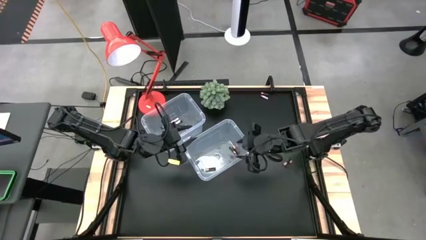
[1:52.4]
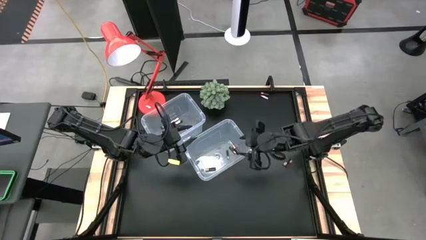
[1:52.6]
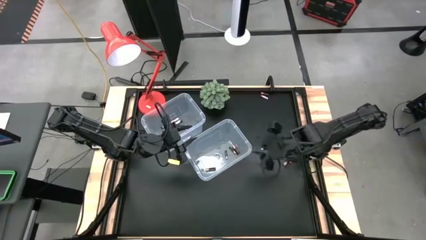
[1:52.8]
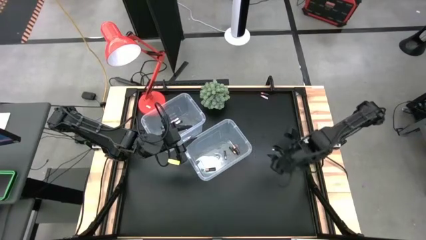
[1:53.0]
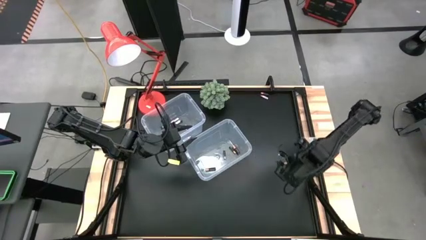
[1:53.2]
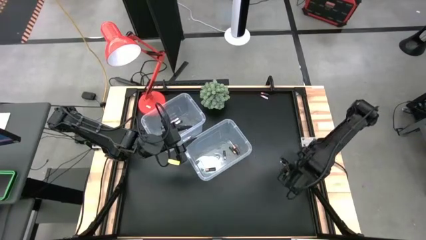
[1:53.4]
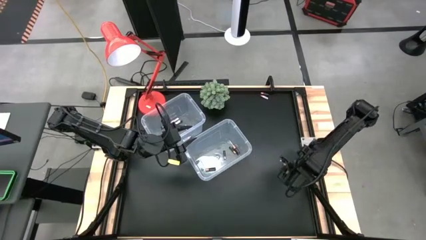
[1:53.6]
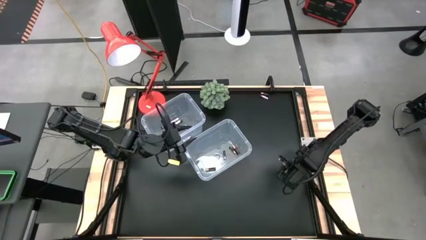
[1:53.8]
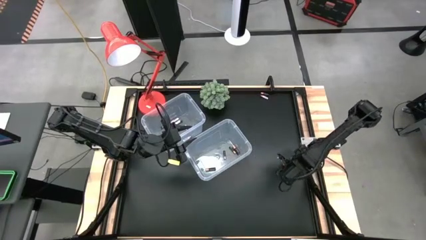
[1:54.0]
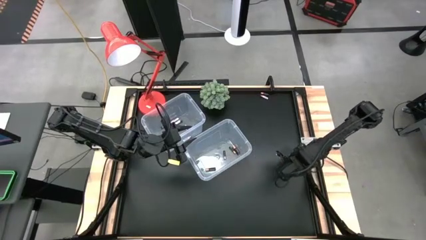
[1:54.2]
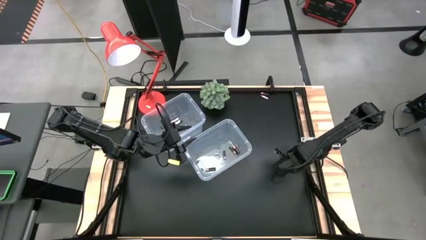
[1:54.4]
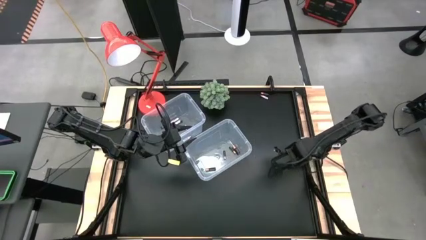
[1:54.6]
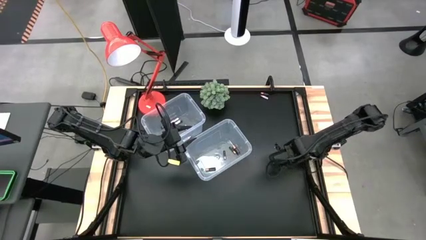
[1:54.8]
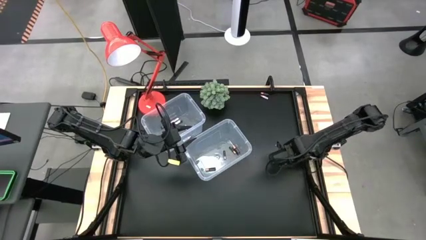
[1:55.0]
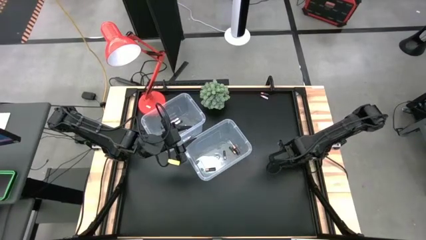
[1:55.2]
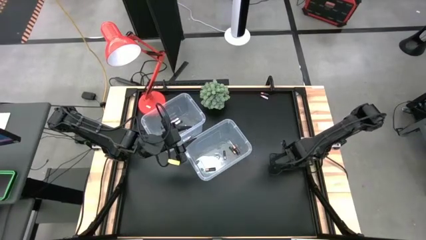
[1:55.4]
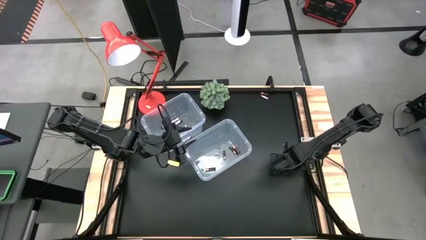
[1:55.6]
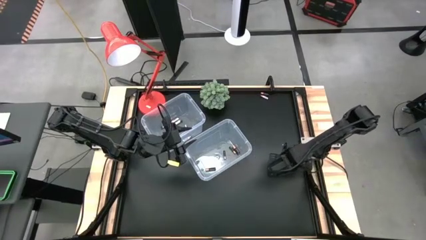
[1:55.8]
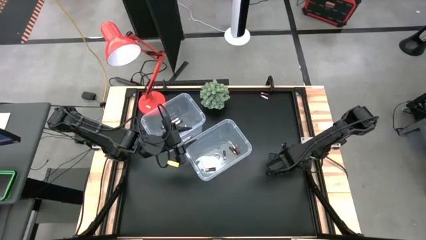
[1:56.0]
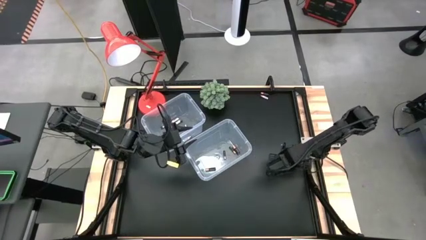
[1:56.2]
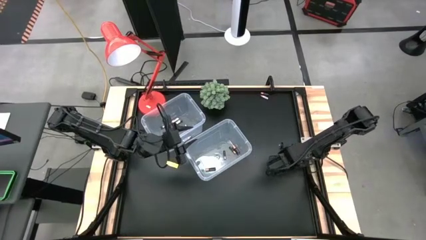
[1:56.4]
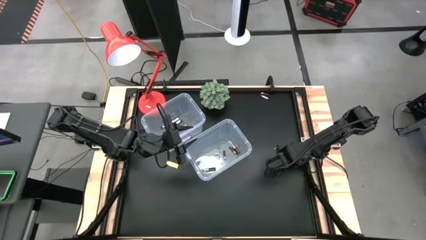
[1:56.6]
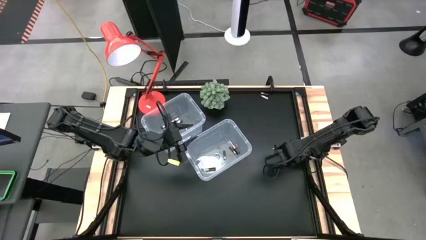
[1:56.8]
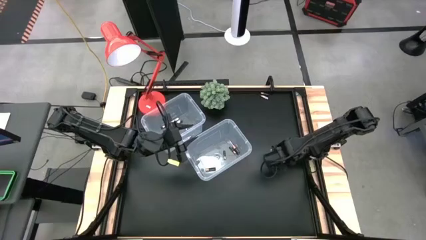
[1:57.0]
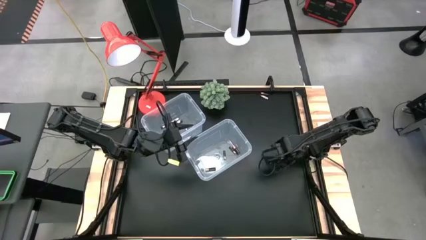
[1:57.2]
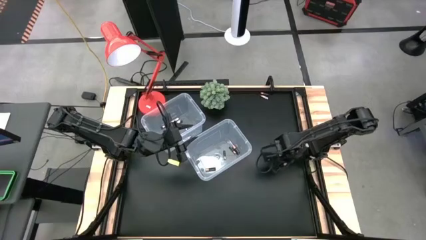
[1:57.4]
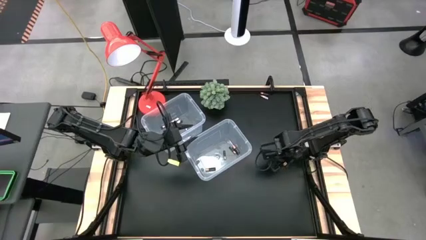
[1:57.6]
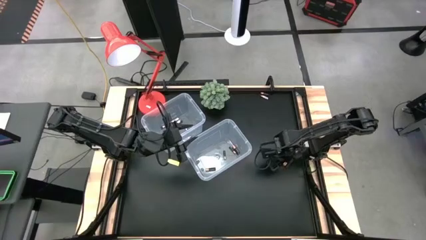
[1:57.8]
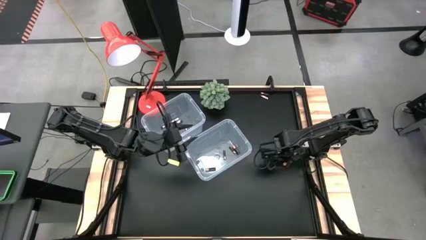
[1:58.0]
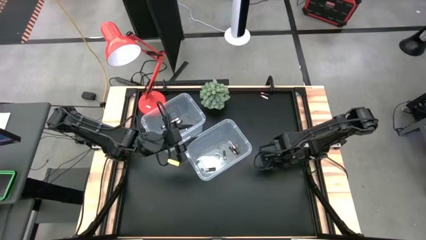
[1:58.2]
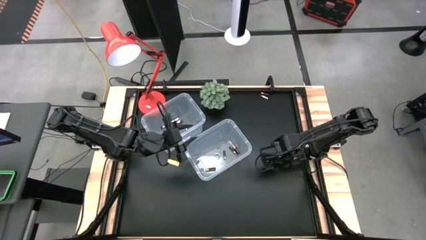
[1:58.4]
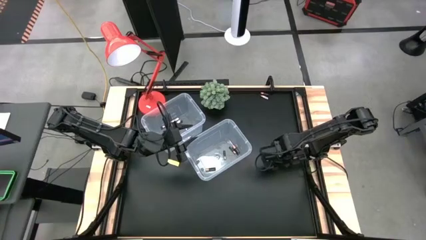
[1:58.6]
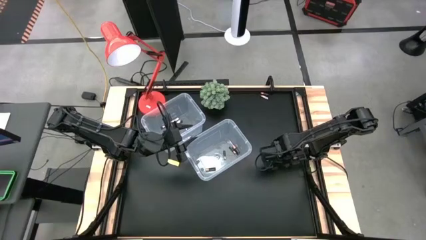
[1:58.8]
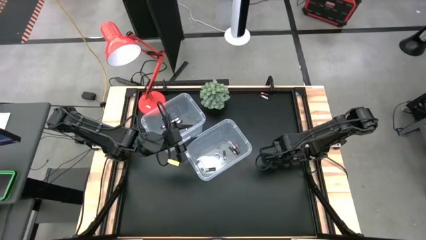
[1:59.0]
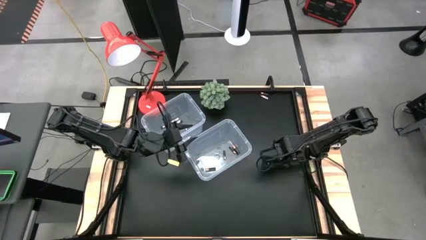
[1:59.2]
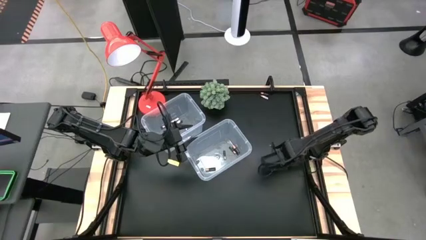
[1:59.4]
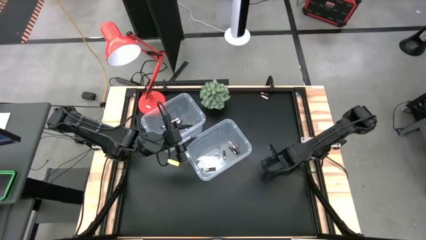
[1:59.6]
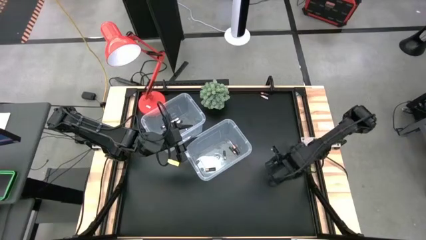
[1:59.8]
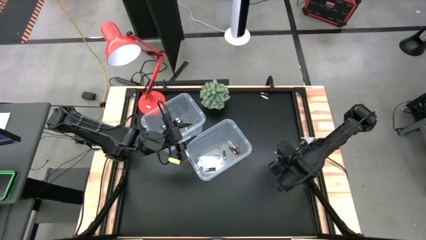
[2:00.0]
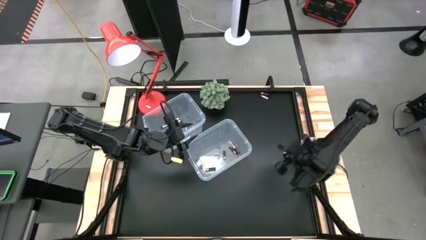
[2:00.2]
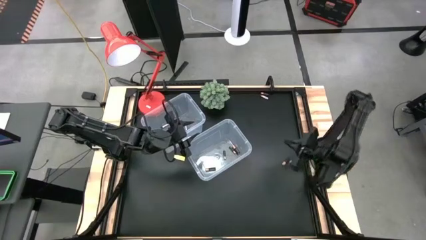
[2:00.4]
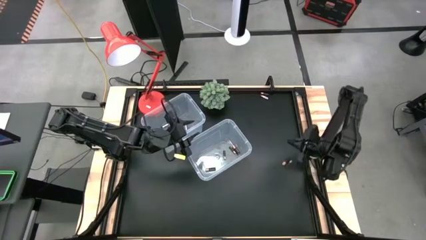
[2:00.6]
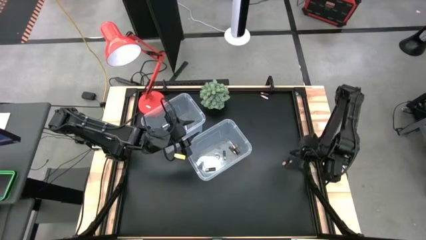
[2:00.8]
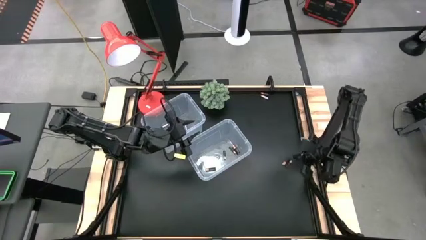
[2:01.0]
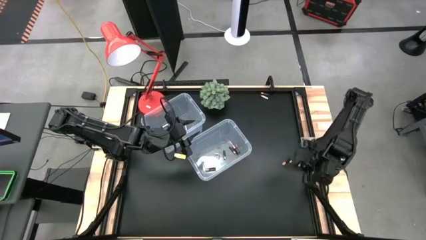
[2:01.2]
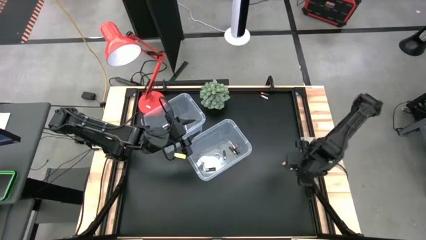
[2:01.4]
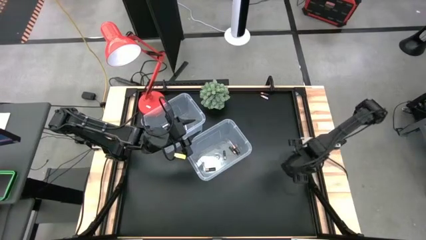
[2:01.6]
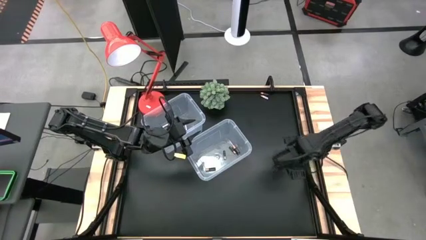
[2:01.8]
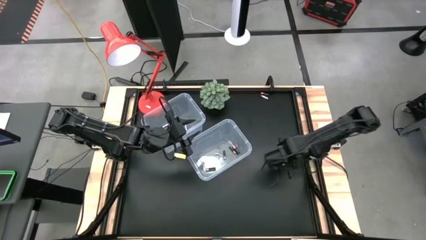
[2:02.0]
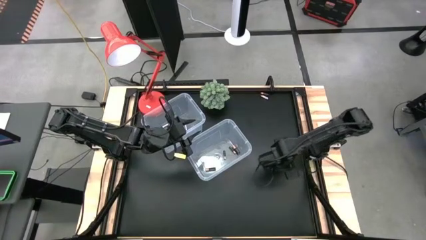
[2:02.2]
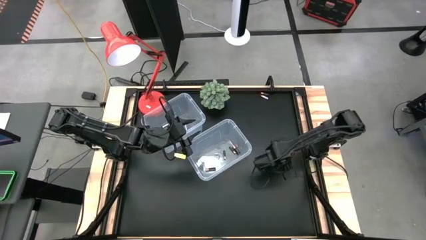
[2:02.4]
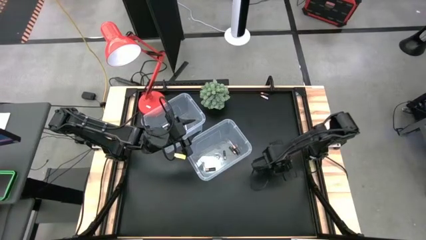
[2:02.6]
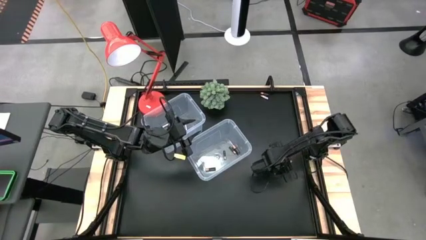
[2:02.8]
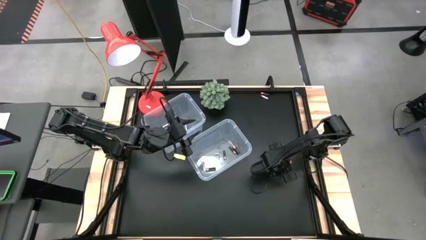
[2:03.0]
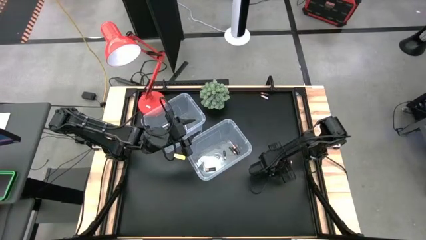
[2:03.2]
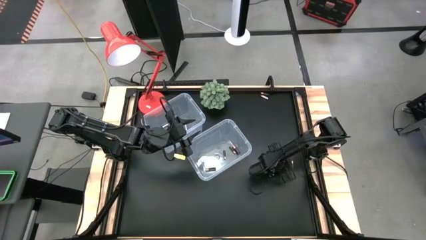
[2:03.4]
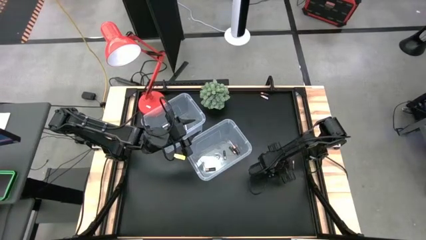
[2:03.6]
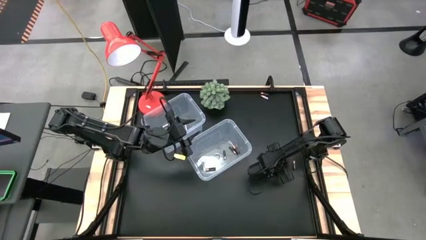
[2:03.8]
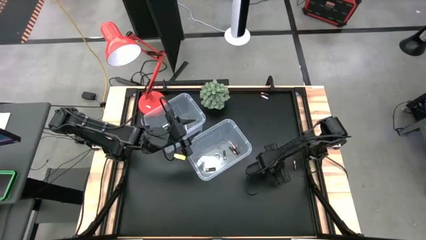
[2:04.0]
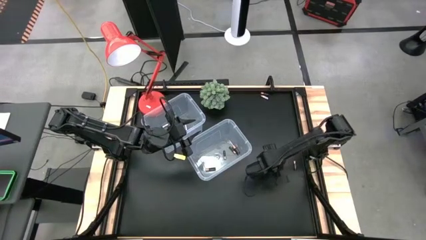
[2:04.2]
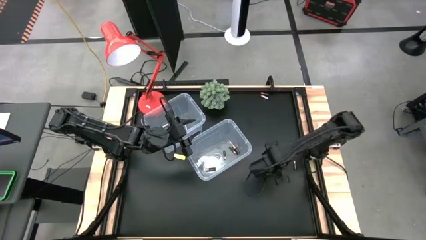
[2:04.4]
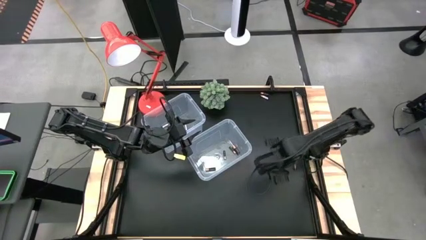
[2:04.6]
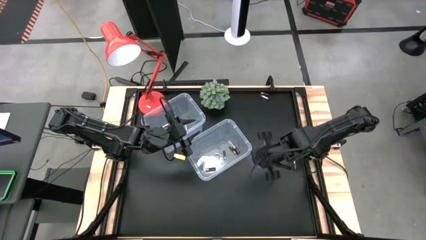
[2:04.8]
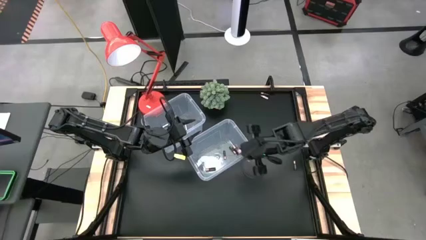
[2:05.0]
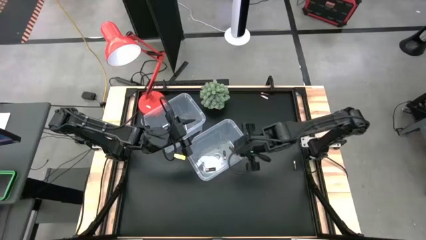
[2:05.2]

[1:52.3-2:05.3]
Task: Sort batteries
Put the brown battery into the bottom transparent bin

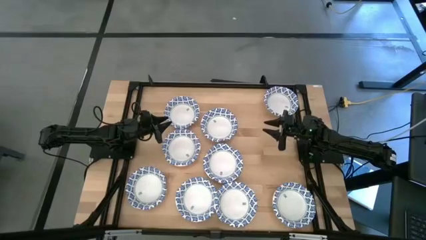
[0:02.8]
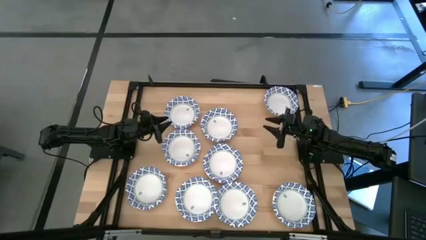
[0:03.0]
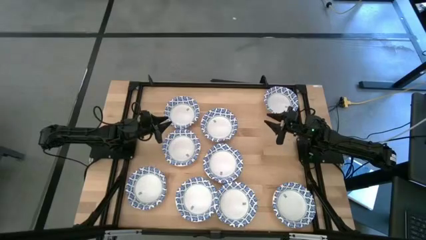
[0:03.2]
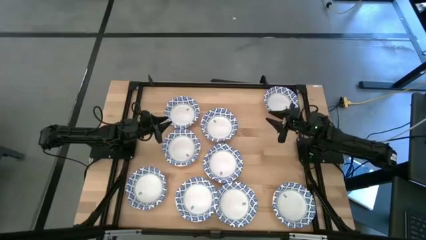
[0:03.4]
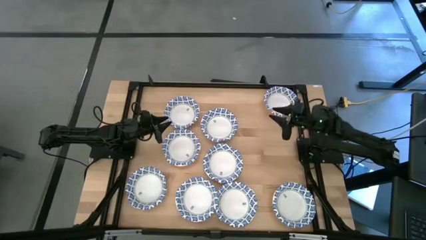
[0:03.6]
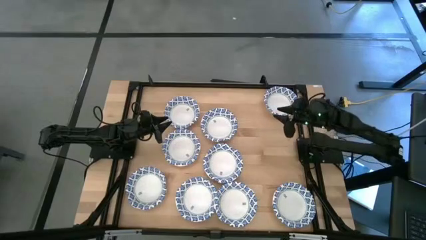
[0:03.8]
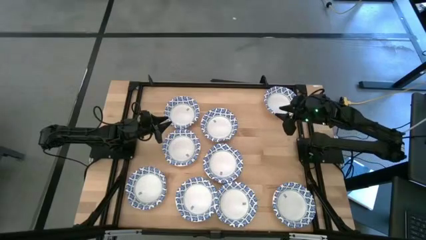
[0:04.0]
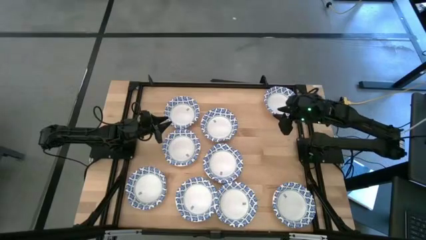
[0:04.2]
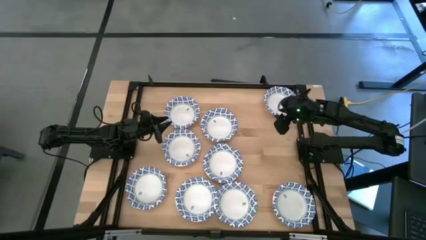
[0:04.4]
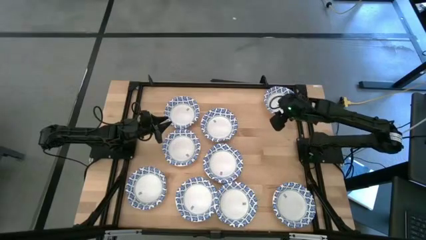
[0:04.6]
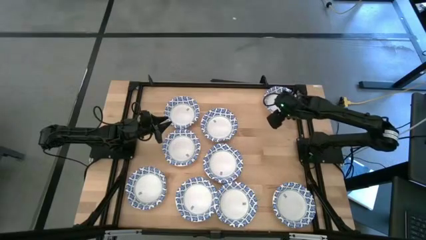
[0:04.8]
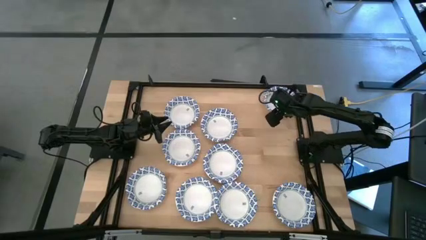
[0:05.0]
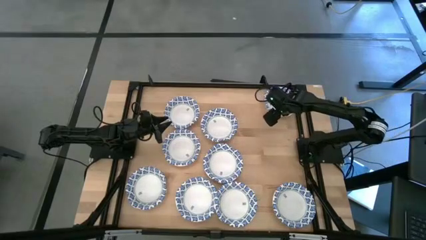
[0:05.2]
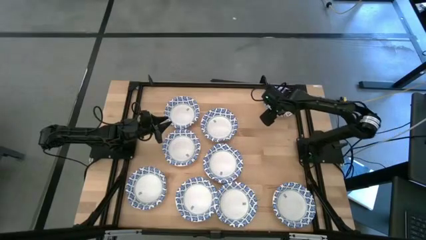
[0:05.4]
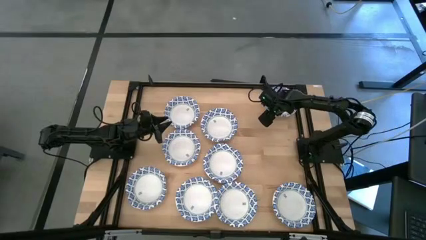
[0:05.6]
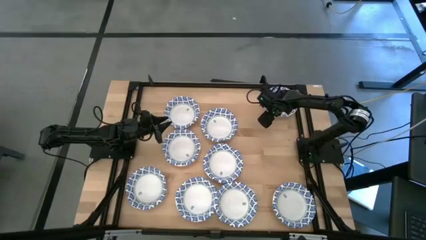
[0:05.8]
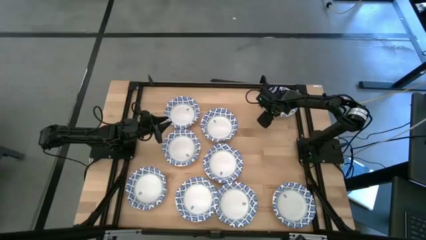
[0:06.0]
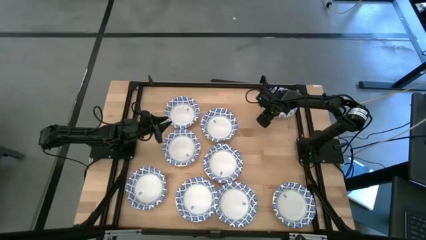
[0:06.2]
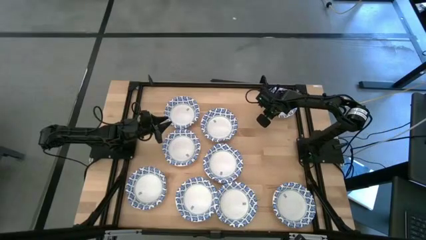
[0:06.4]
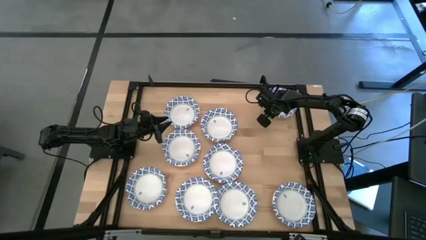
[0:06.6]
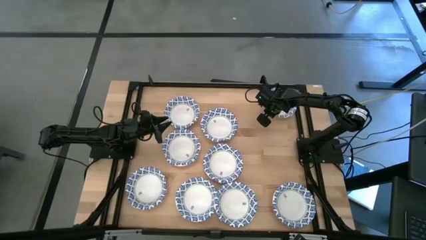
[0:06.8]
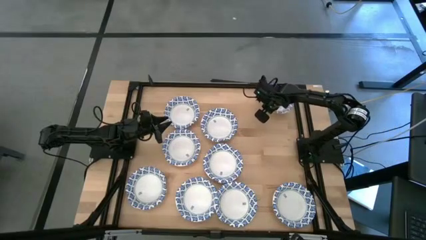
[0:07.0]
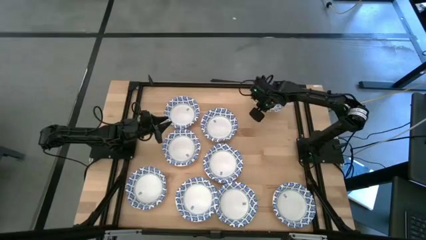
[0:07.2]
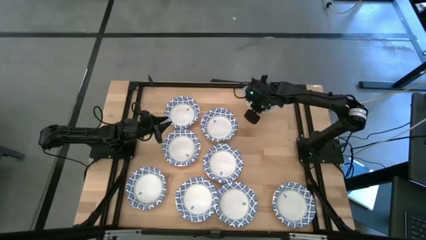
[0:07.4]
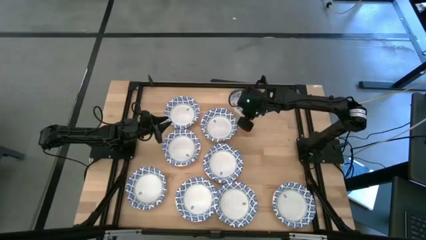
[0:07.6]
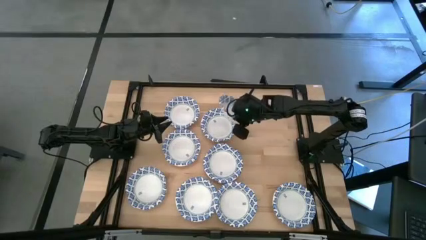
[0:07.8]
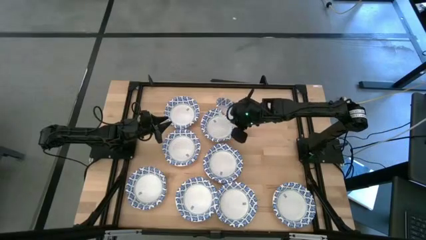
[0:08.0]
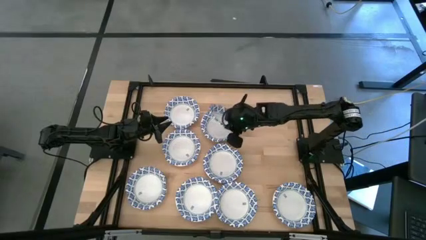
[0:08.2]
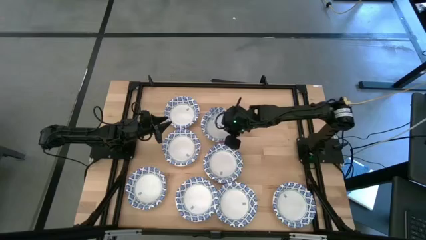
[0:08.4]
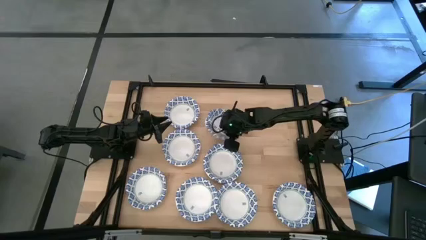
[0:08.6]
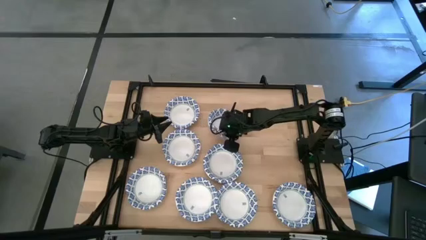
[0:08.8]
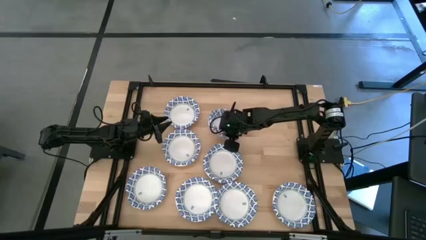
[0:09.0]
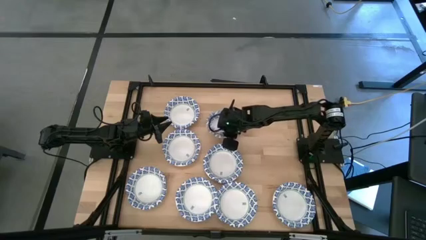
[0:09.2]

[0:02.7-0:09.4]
Task: Nest bowls inside each other
Stack the blue patterned bowl on top of the other blue patterned bowl
